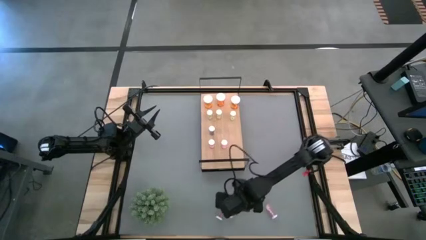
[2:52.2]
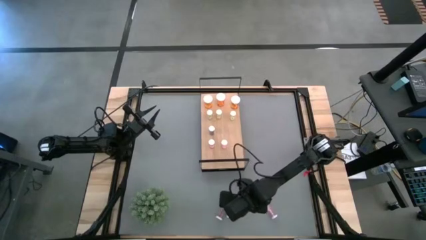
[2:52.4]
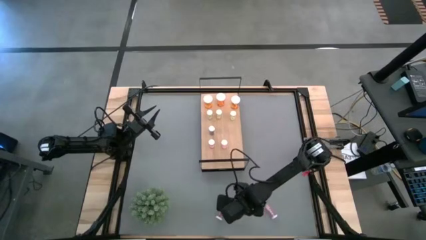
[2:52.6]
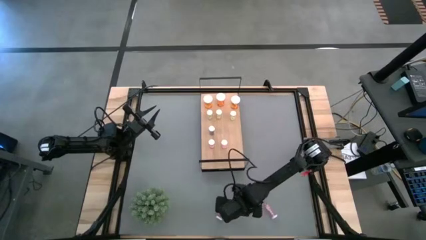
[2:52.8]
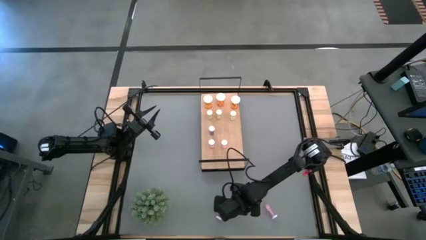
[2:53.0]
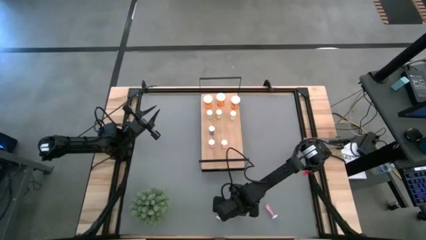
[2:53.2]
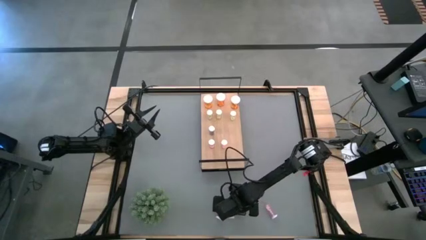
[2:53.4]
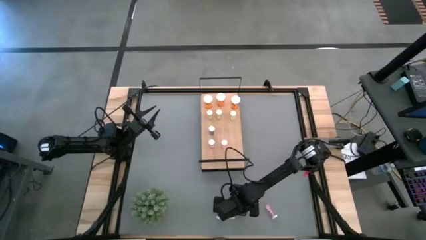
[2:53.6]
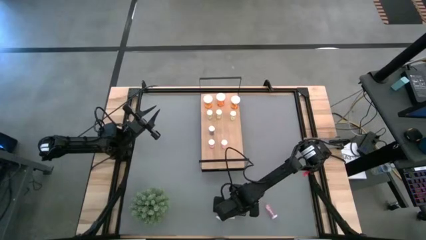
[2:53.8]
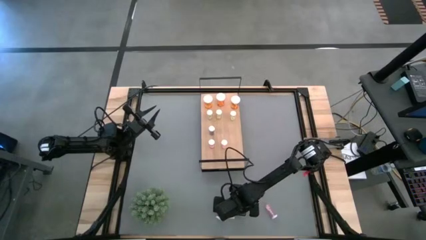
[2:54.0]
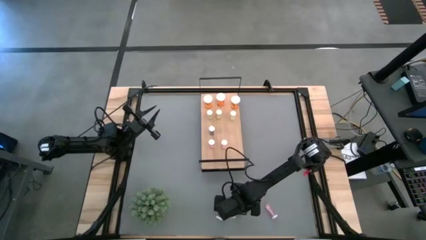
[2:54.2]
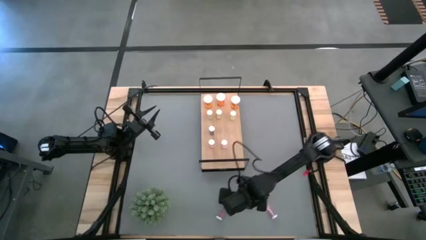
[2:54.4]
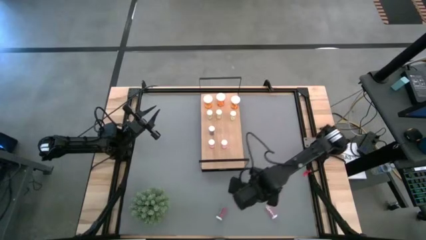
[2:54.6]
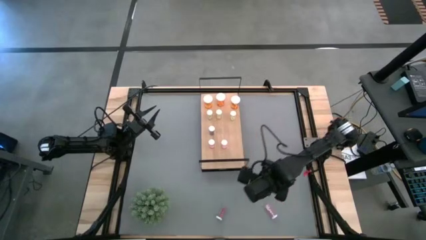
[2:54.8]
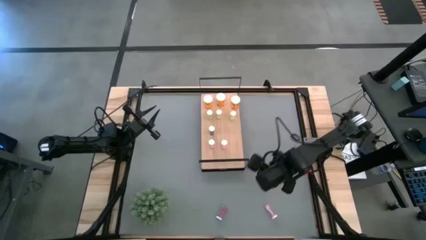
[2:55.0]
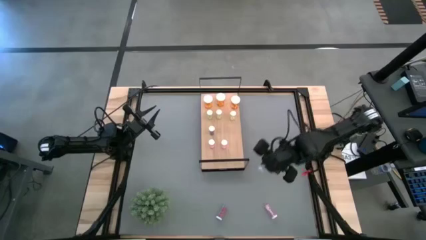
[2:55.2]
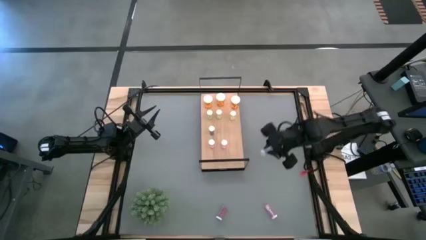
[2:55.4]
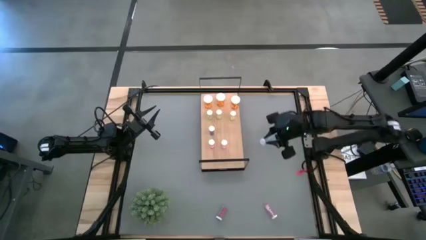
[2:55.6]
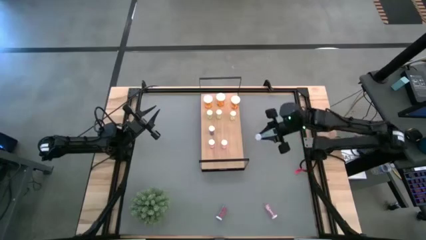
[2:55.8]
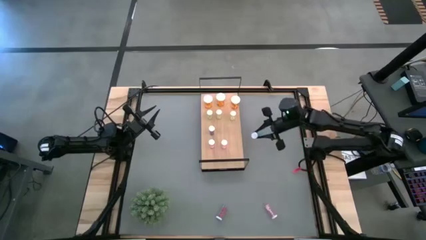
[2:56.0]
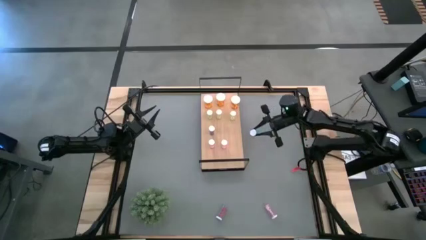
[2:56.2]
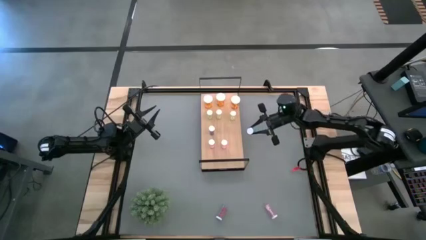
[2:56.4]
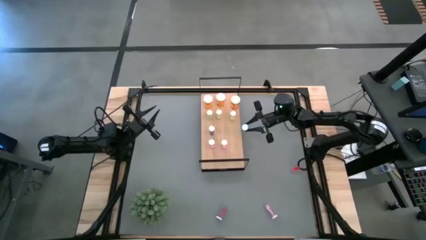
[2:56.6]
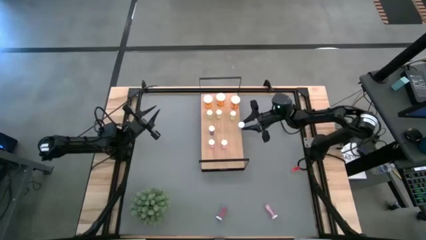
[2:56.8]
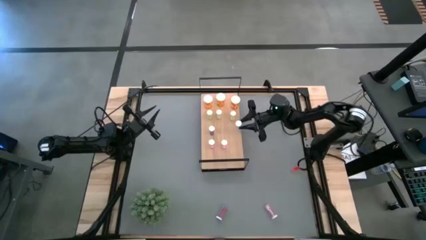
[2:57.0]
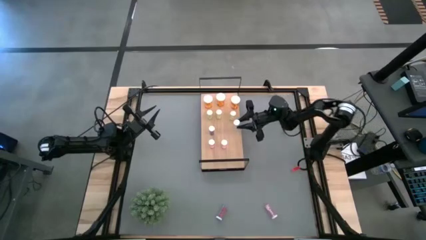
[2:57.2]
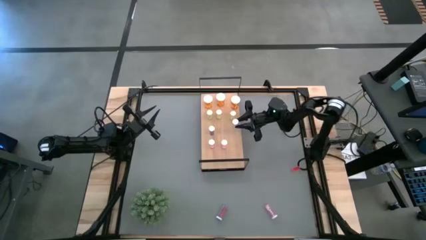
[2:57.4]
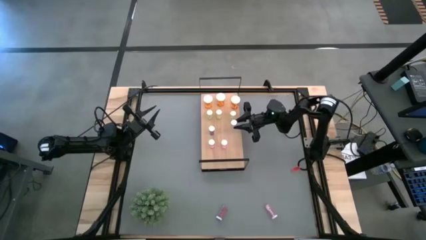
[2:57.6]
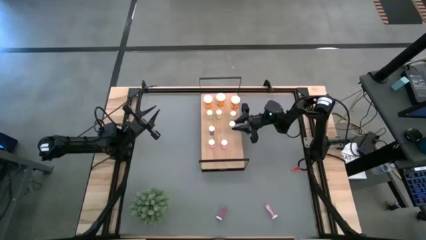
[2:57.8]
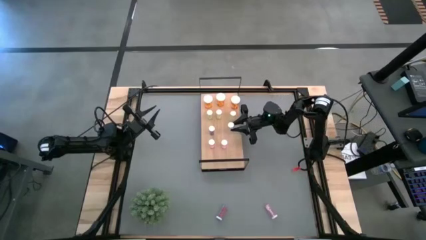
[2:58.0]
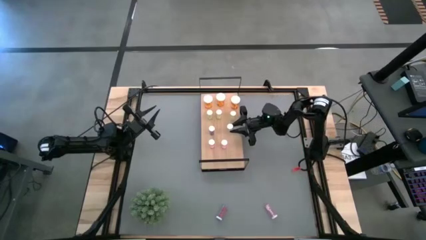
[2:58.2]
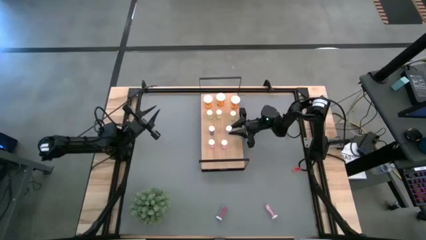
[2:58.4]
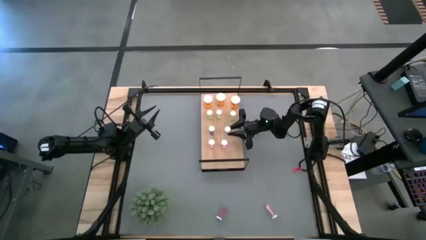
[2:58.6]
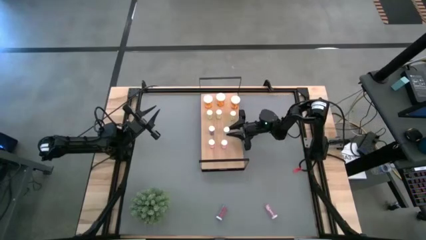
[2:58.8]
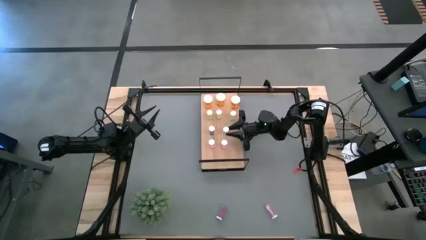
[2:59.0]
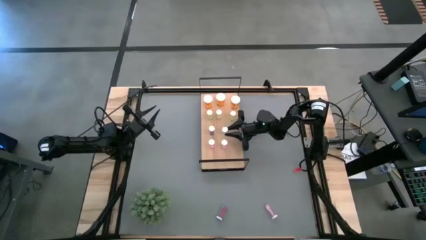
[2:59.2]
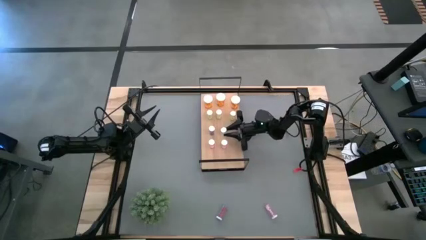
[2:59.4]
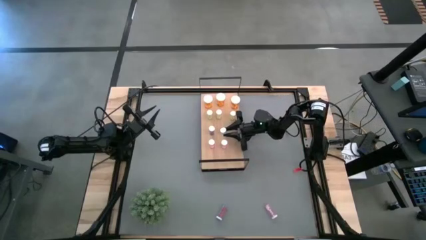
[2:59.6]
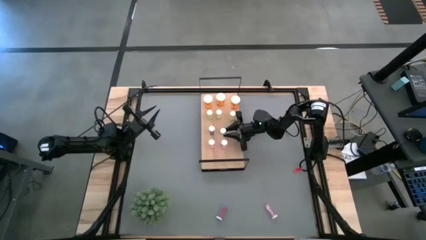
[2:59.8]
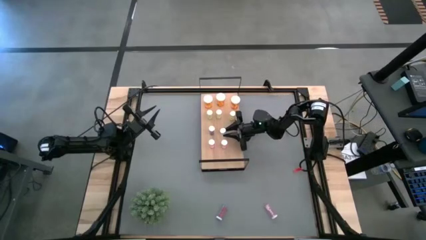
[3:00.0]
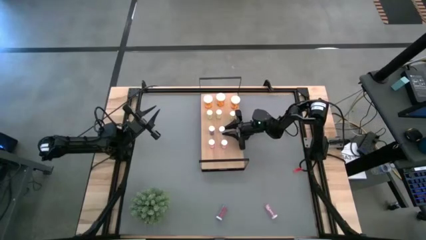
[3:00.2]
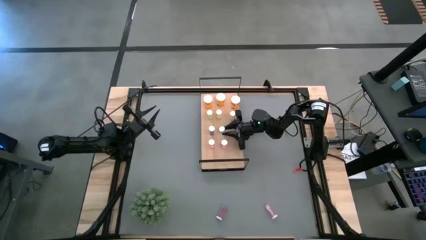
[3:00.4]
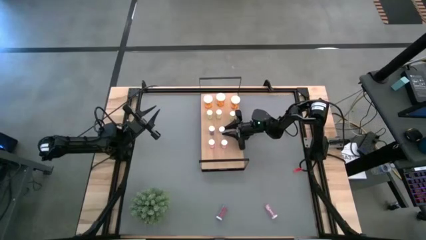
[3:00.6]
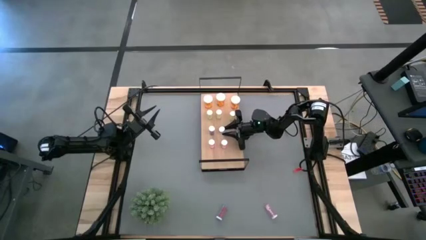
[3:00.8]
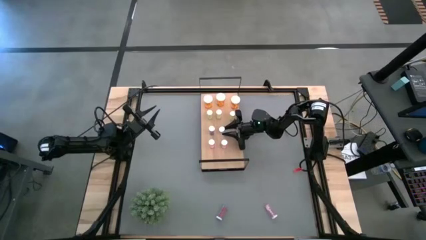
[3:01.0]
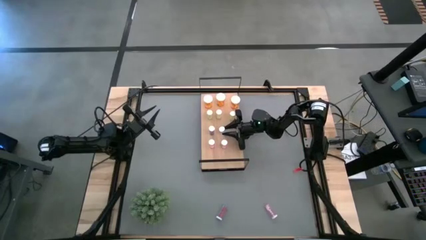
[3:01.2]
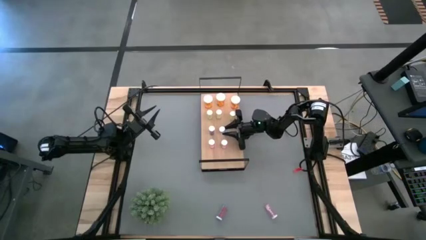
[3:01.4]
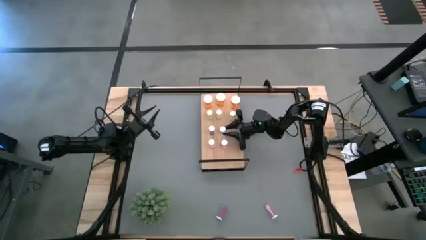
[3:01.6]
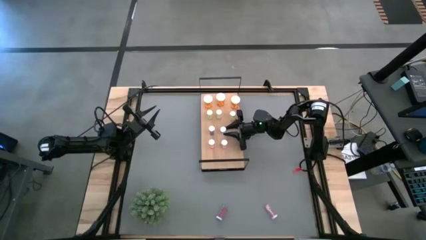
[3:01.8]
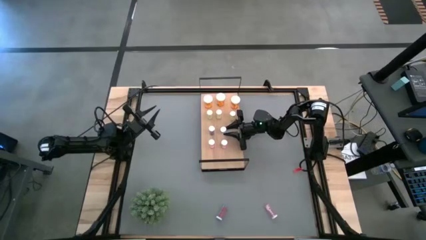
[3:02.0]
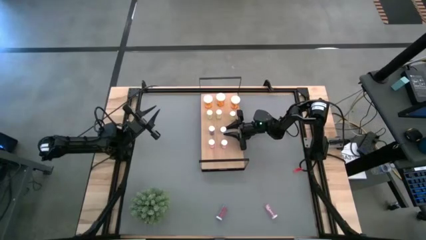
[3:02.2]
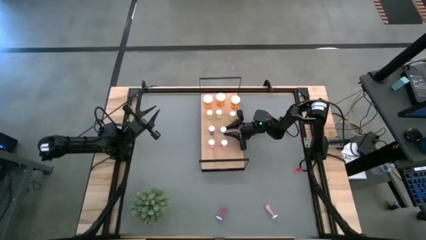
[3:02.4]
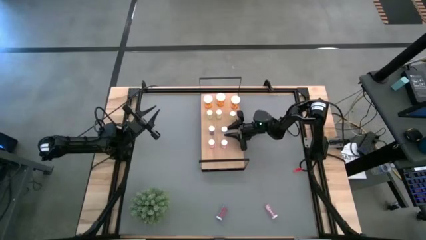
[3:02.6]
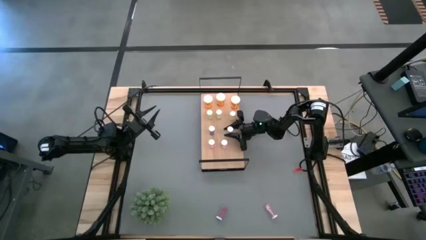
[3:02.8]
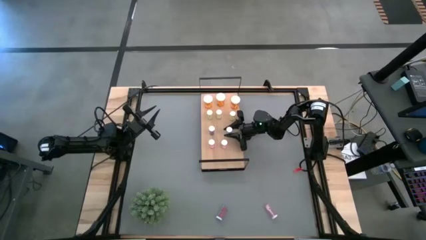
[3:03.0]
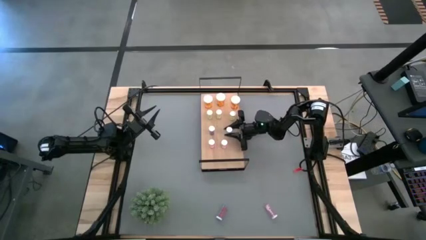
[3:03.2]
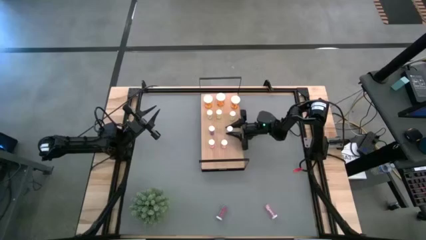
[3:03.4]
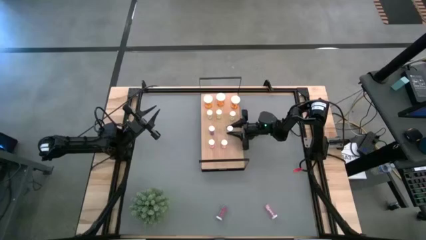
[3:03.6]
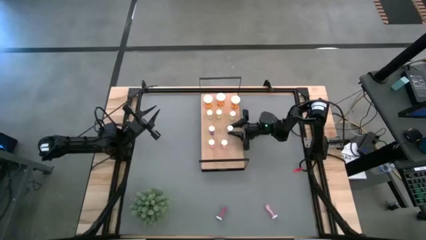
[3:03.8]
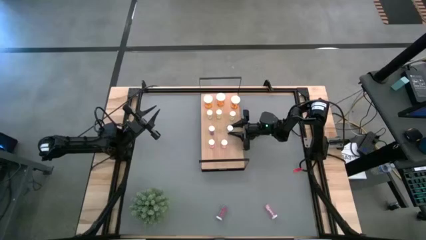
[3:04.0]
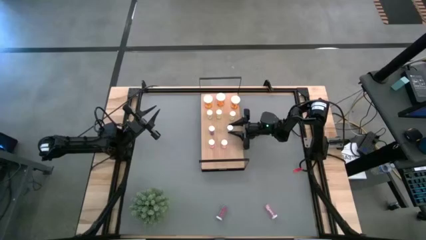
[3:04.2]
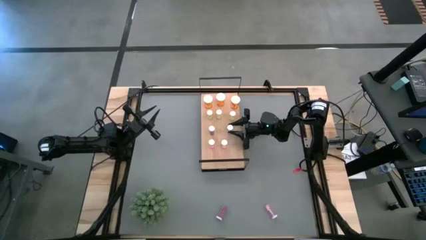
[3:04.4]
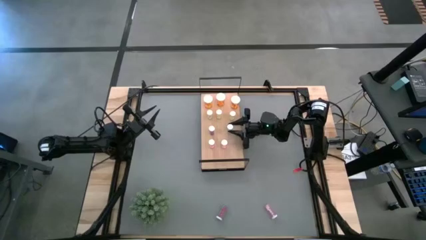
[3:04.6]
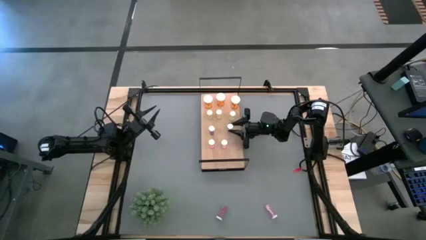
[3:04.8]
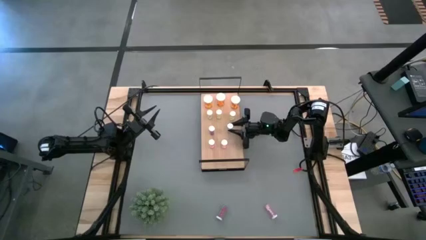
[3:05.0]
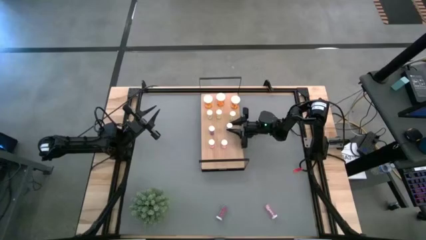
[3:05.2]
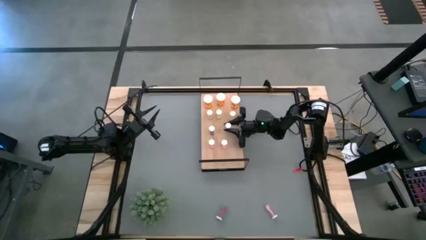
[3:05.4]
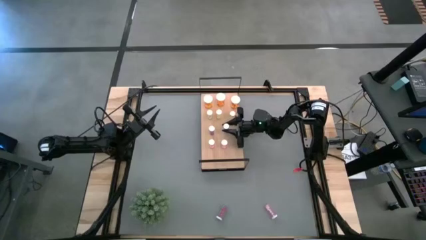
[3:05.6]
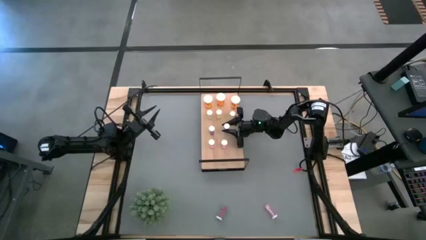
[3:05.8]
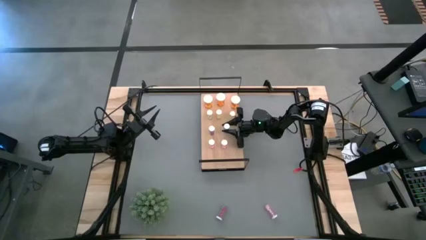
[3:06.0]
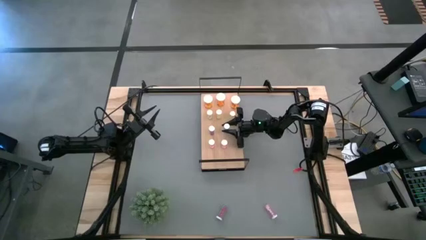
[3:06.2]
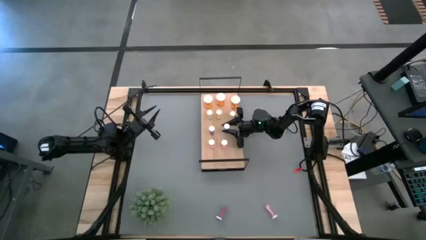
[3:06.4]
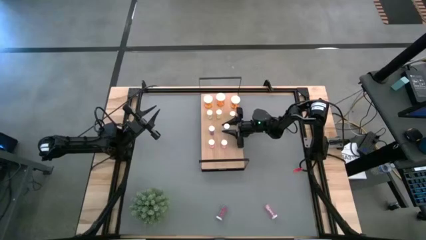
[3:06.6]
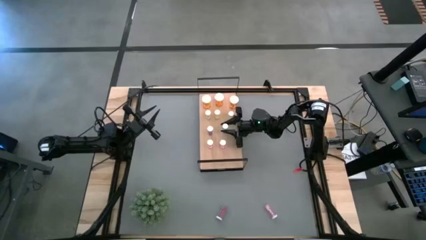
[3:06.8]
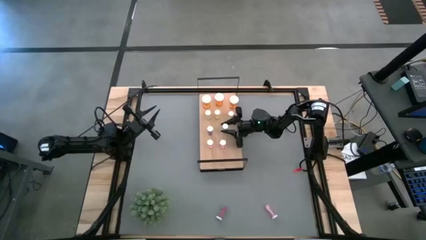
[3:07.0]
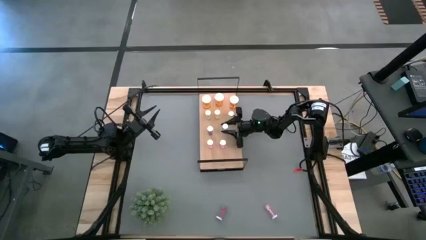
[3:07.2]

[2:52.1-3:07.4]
Task: Pick and place medicine bottles onto shelf by color
Put the right blue pill bottle on the shelf aligned with the other blue pill bottle
